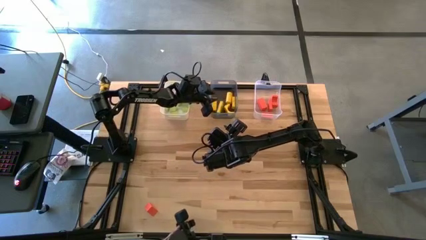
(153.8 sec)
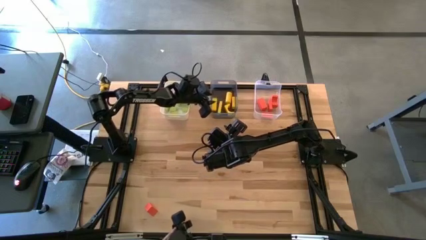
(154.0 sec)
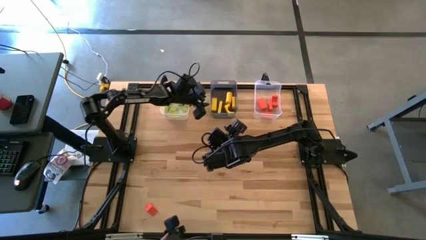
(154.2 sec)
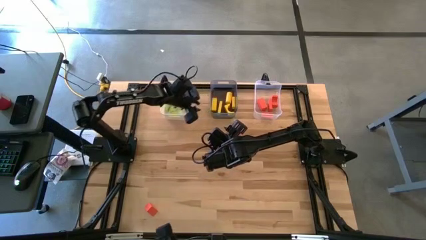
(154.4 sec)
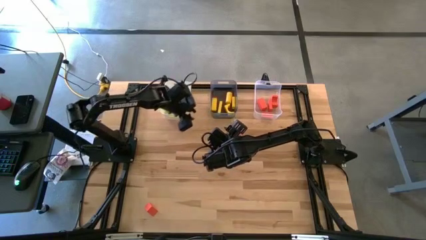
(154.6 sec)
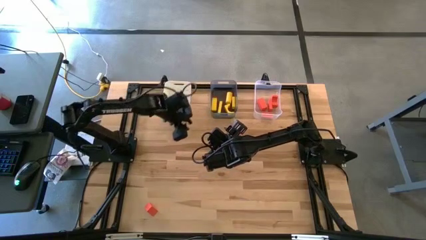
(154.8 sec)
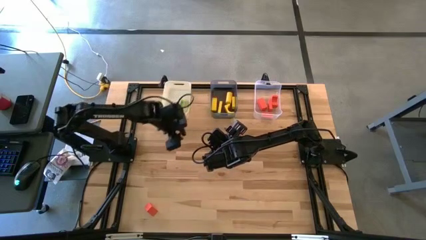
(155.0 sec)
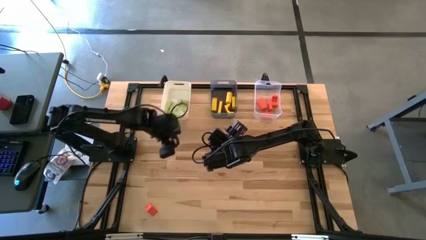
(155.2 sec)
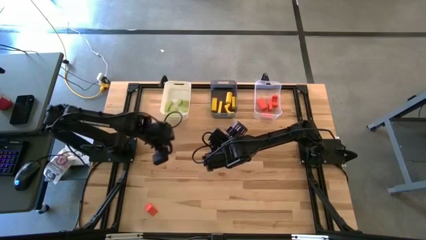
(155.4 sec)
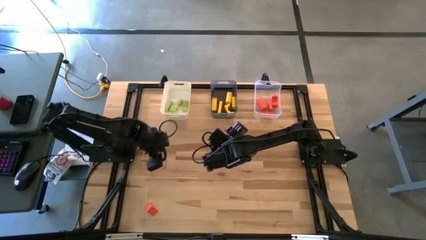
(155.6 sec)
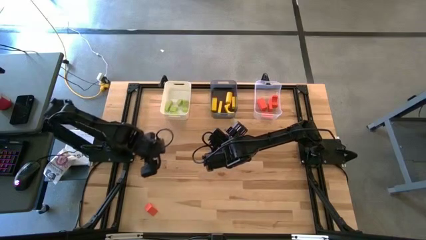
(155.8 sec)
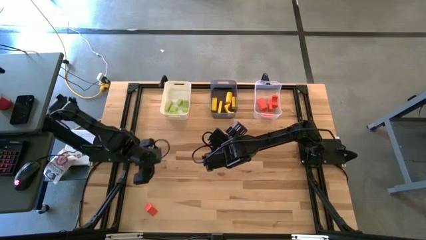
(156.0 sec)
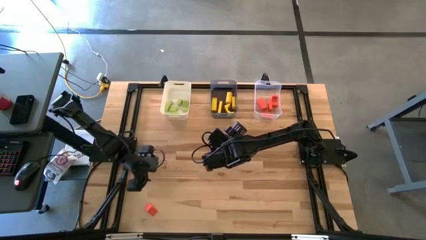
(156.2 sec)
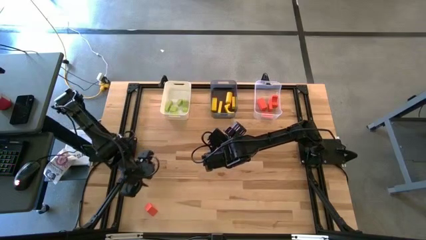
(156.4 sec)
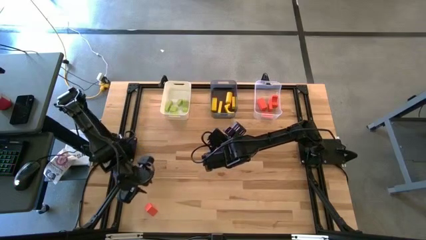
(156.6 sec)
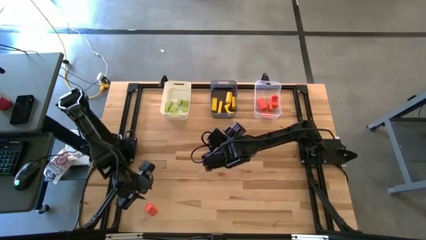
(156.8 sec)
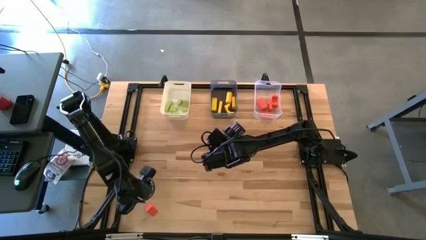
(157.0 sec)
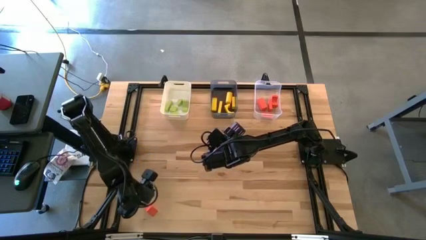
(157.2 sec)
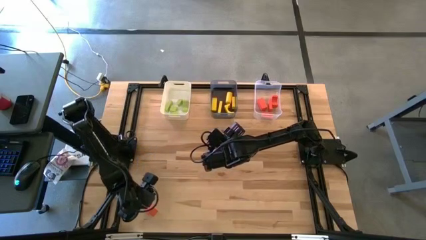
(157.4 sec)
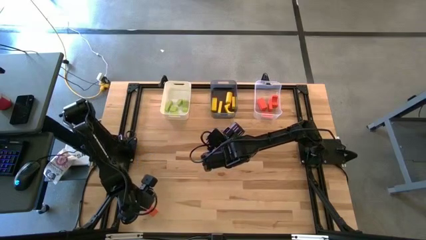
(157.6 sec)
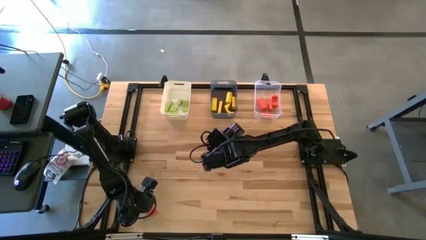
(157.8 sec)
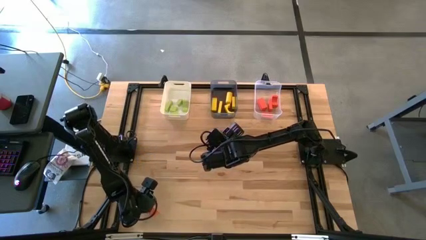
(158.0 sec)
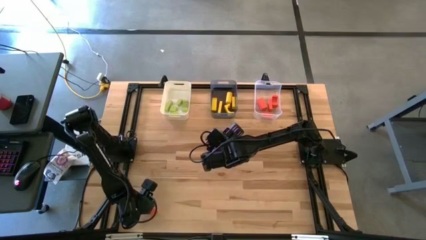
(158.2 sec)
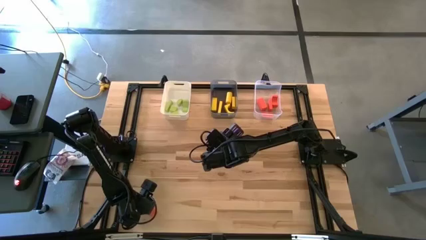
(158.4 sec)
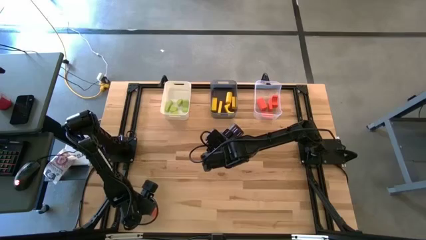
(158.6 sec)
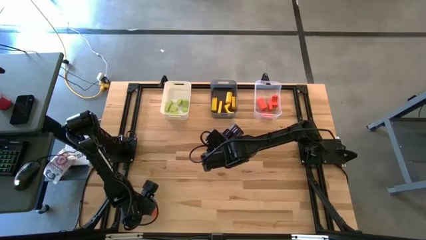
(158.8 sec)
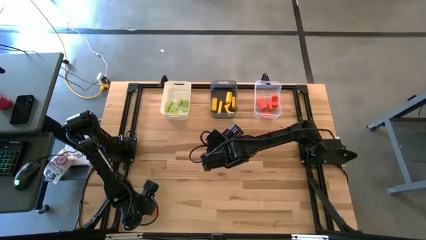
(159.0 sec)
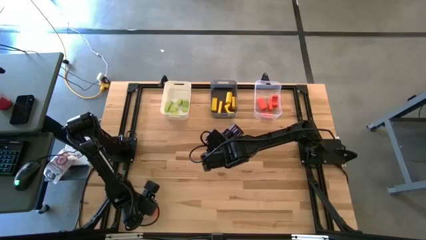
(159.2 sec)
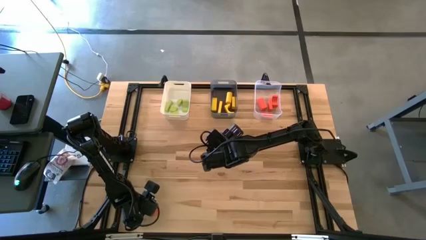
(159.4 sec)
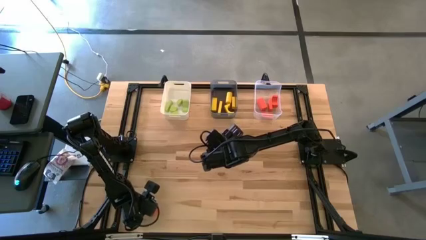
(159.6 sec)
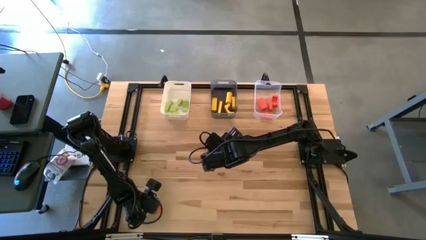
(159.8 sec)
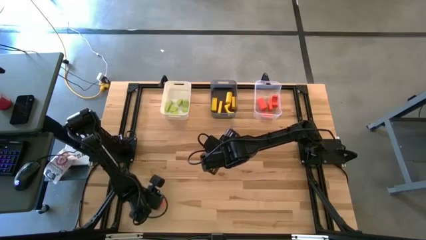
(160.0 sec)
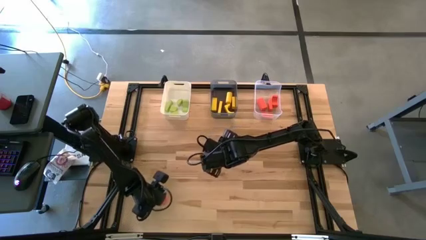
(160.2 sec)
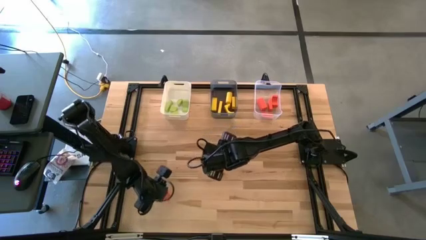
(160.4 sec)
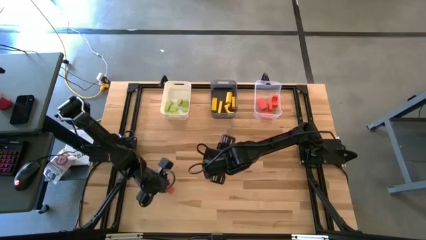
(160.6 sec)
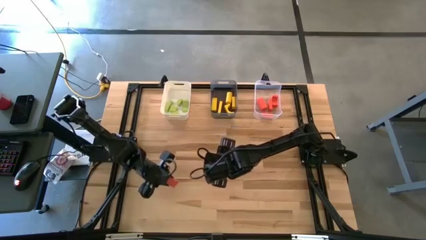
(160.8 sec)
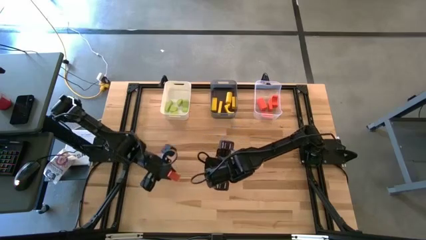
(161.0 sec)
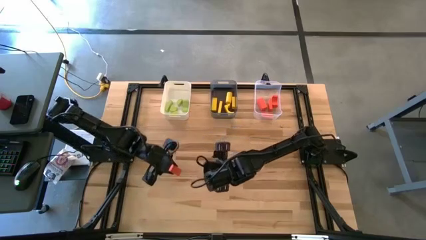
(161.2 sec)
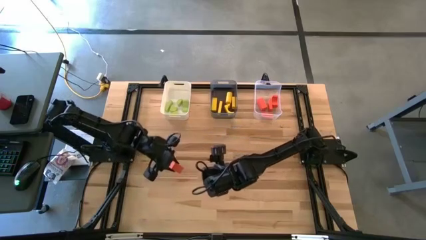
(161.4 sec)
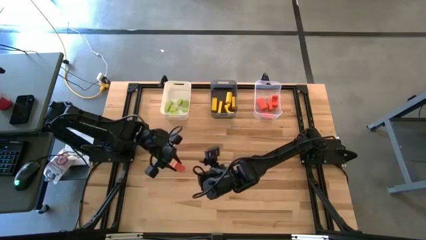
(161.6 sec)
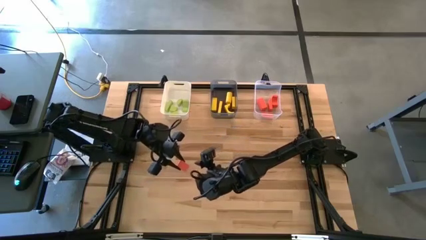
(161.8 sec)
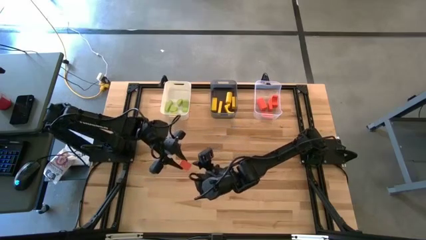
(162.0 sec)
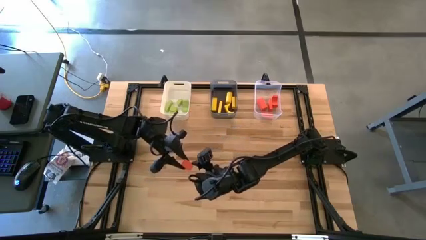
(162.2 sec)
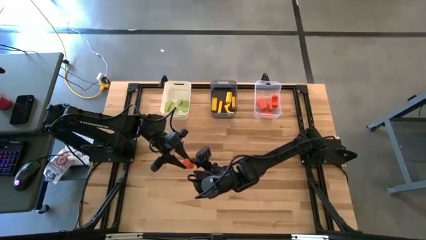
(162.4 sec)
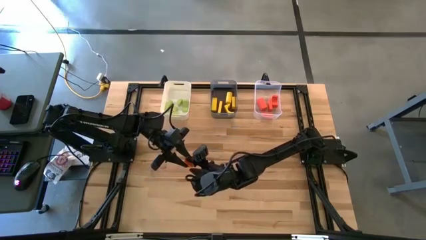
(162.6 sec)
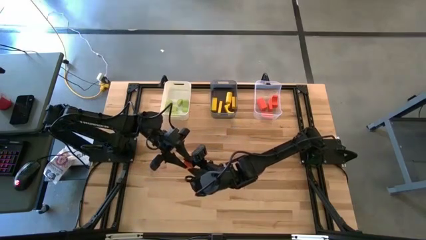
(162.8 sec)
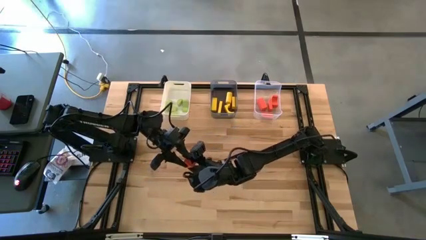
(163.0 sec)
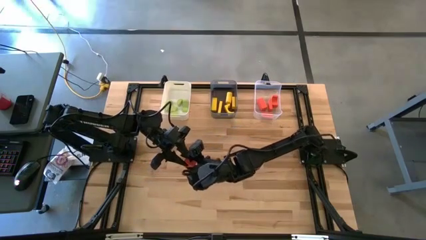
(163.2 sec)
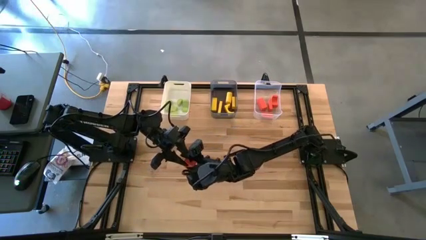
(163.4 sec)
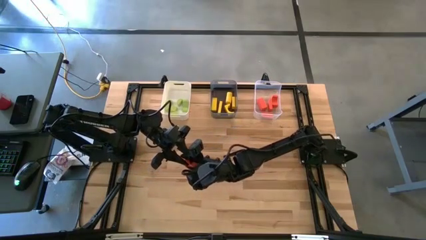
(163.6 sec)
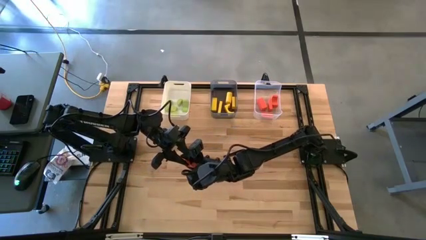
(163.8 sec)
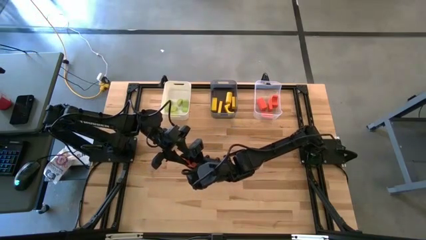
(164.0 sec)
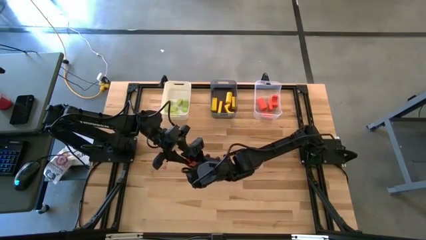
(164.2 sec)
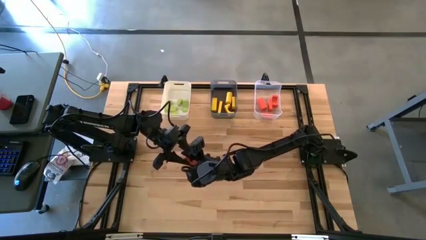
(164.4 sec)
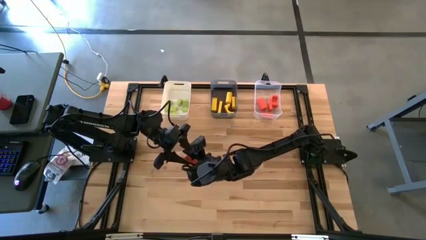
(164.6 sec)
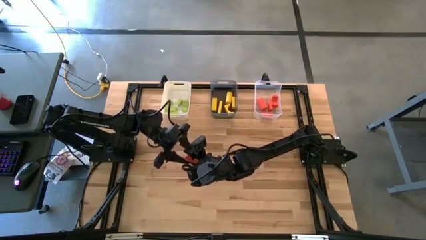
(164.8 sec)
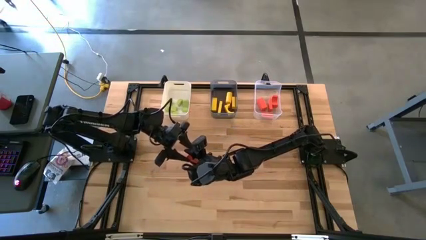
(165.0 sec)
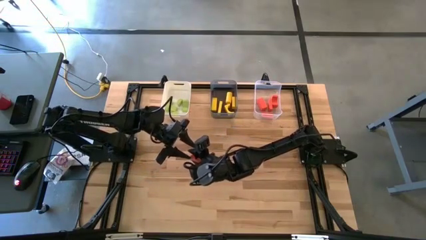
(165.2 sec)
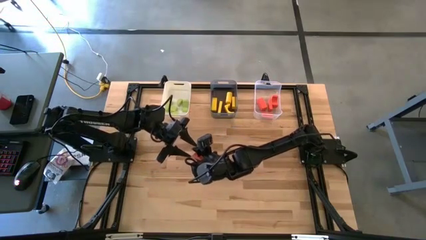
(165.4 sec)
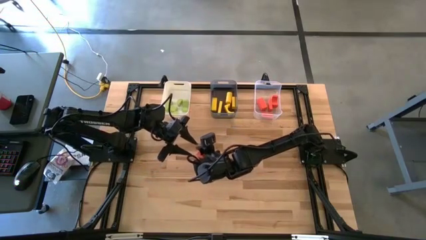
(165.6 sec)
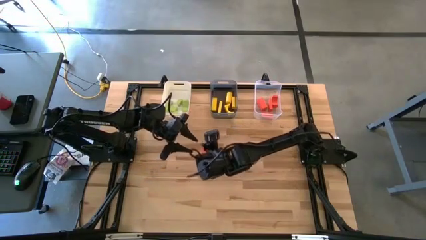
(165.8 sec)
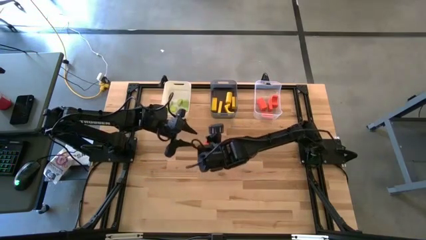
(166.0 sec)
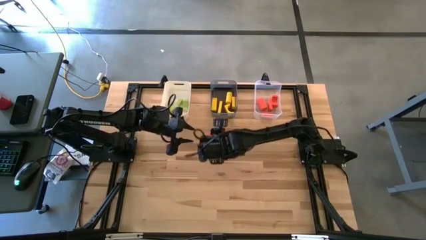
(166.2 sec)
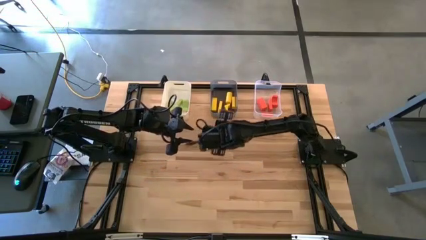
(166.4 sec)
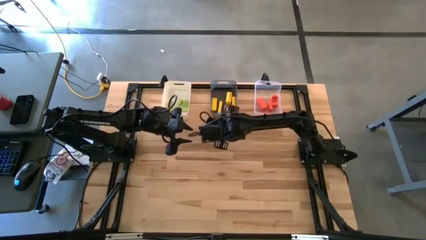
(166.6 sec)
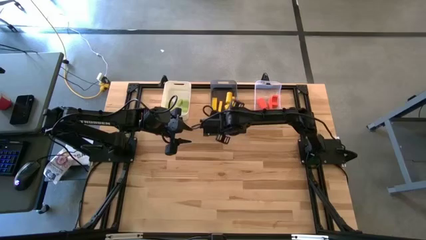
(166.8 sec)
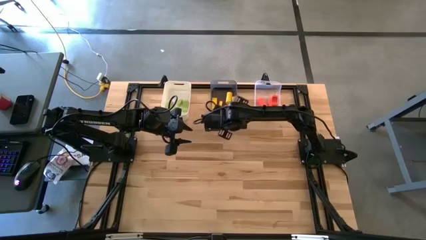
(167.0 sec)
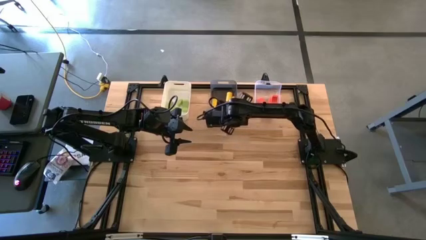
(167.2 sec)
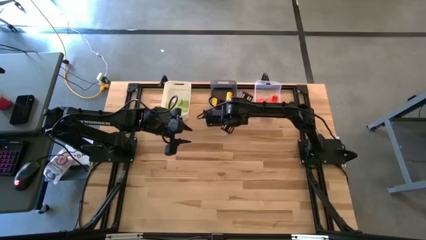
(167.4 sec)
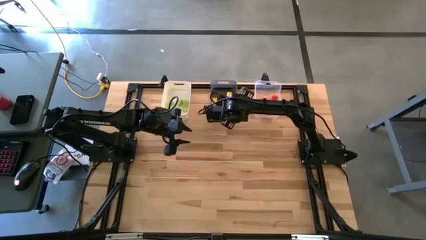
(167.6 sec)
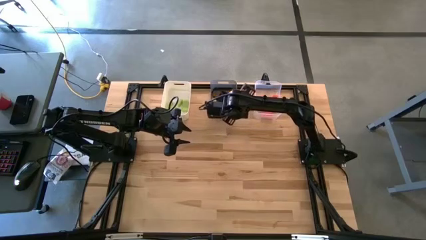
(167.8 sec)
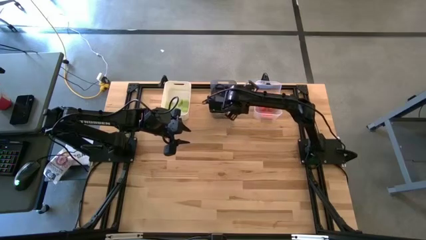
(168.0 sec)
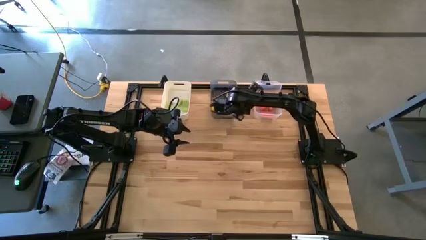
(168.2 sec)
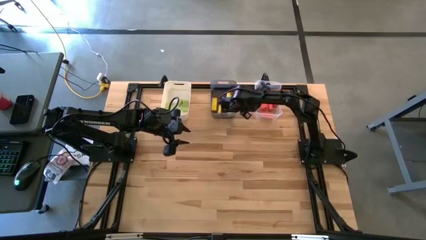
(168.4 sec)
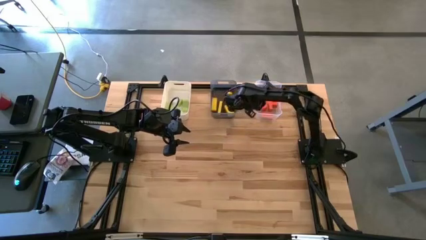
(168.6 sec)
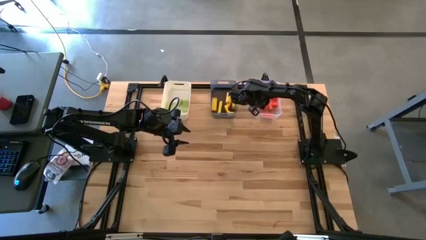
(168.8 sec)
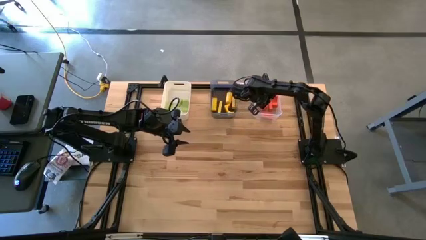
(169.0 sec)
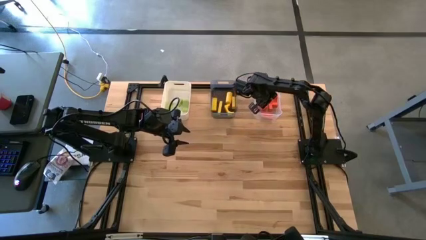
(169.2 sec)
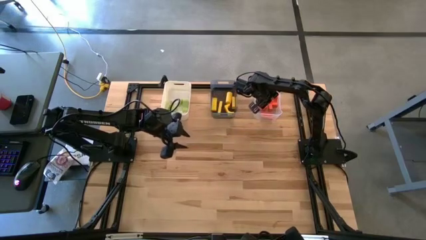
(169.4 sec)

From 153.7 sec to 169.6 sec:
Task: Sort & place blocks by color
Put the orange block into the transparent bin
